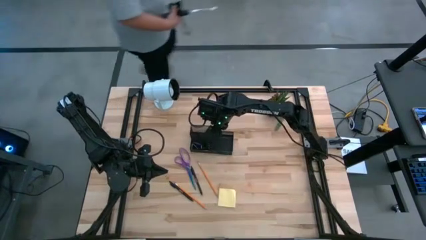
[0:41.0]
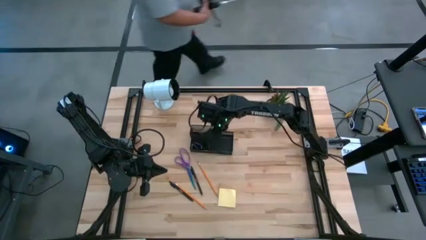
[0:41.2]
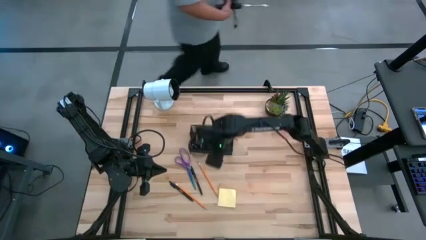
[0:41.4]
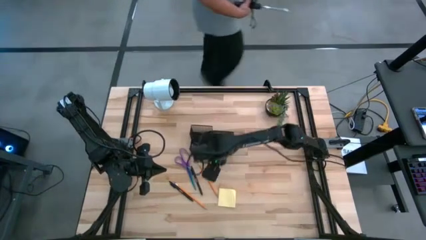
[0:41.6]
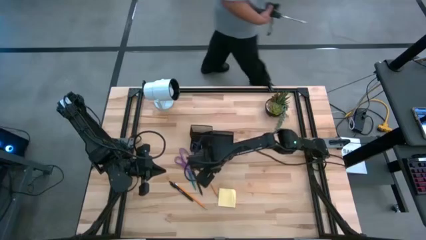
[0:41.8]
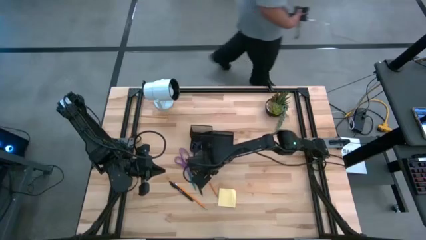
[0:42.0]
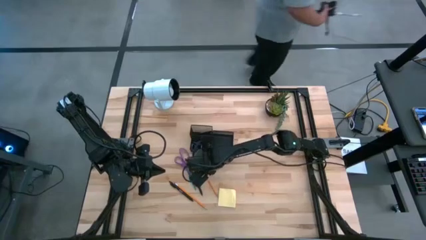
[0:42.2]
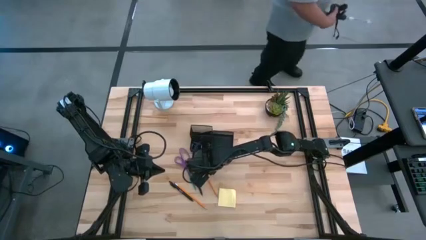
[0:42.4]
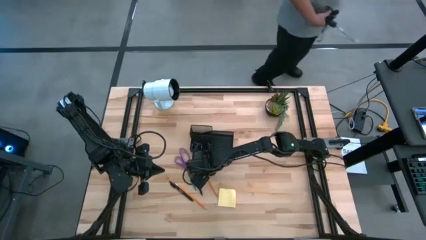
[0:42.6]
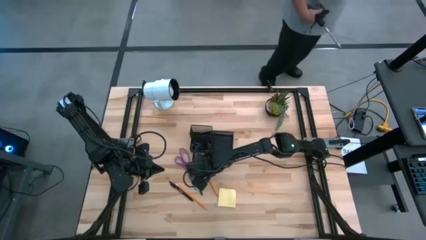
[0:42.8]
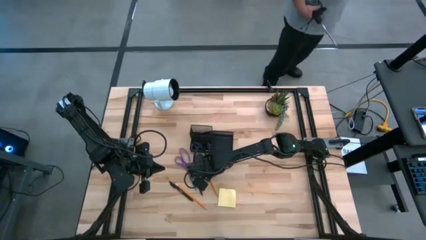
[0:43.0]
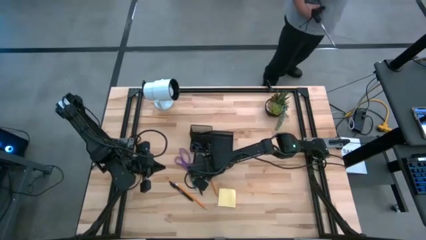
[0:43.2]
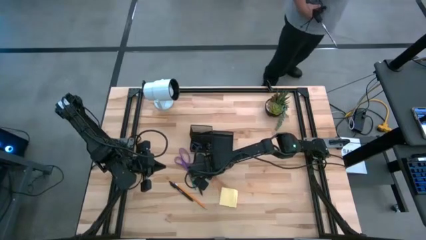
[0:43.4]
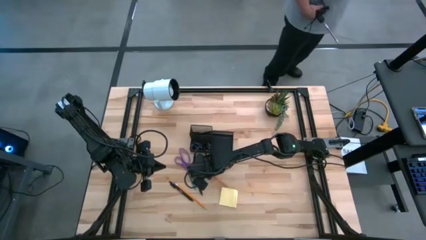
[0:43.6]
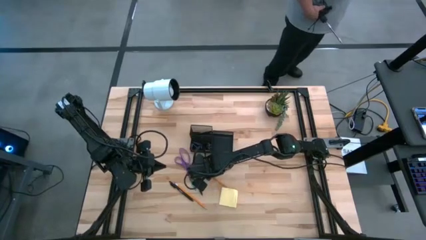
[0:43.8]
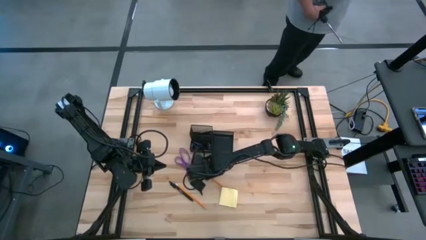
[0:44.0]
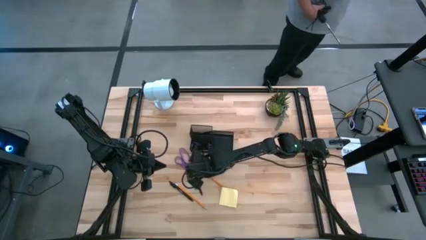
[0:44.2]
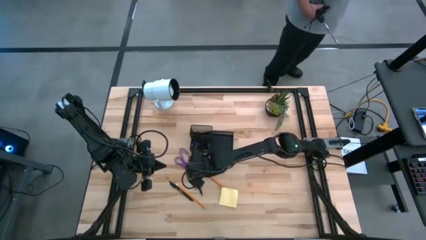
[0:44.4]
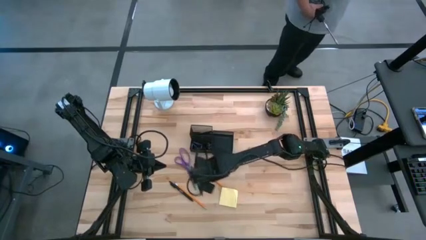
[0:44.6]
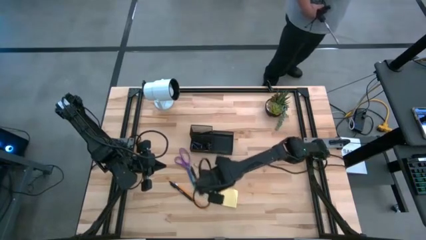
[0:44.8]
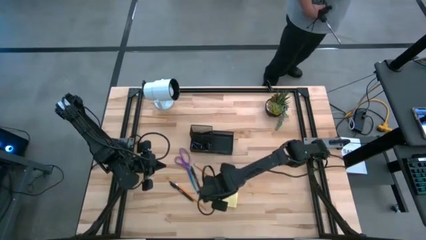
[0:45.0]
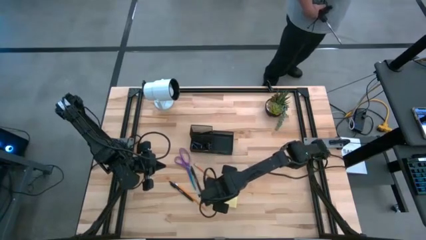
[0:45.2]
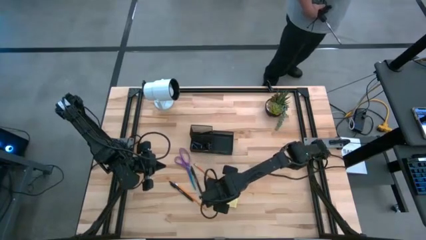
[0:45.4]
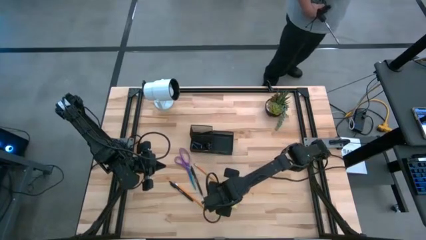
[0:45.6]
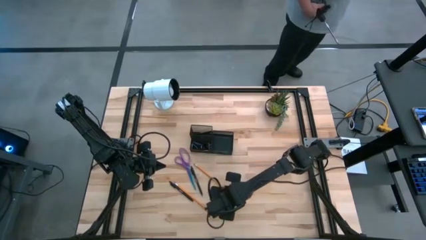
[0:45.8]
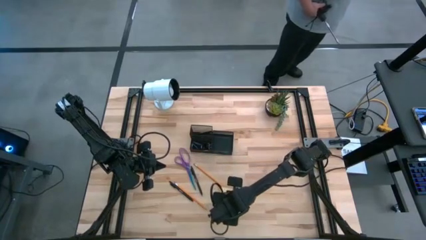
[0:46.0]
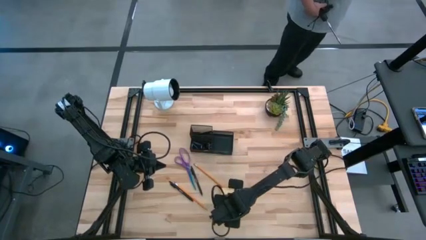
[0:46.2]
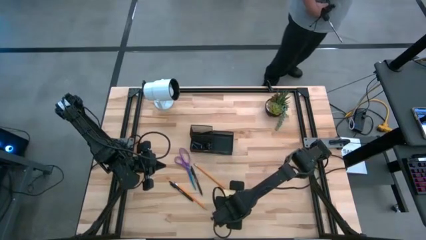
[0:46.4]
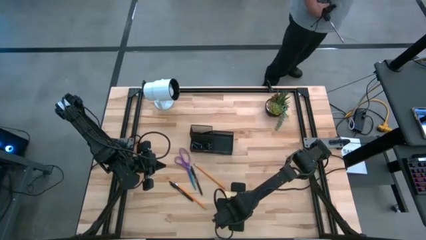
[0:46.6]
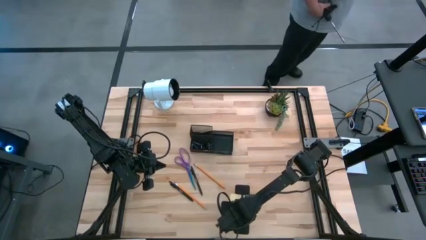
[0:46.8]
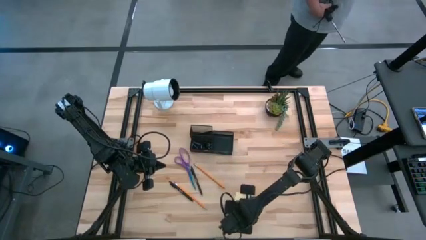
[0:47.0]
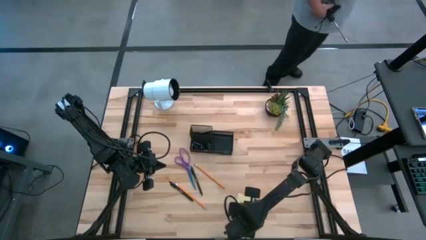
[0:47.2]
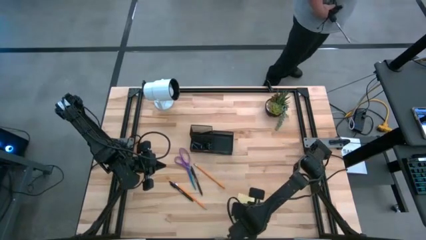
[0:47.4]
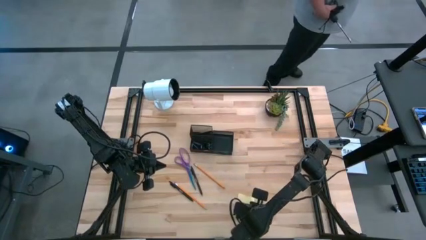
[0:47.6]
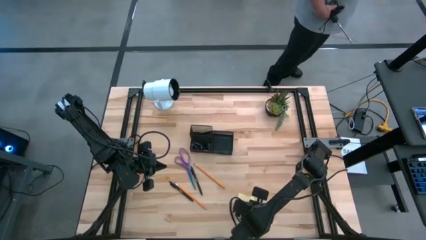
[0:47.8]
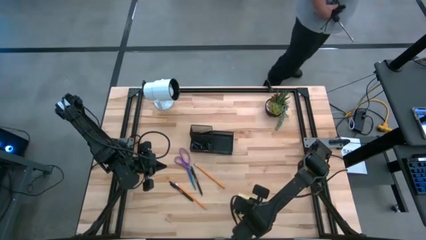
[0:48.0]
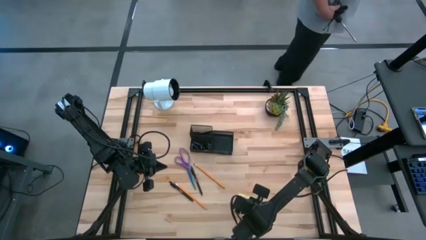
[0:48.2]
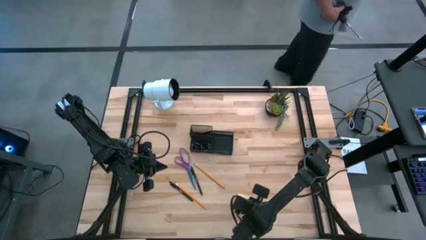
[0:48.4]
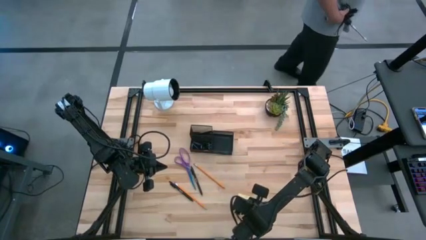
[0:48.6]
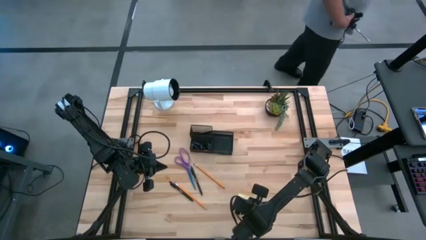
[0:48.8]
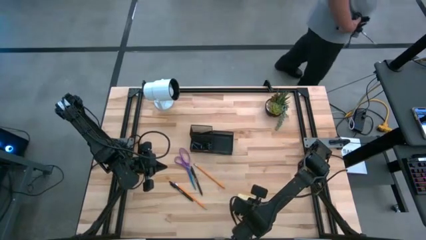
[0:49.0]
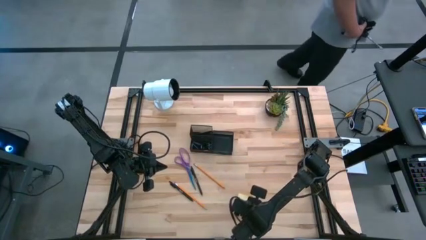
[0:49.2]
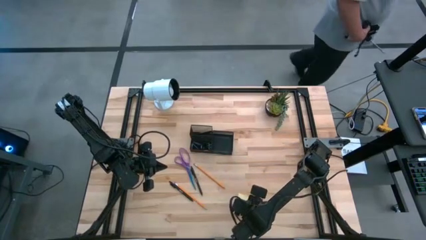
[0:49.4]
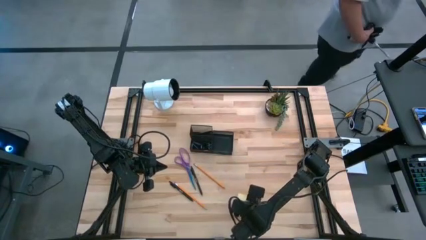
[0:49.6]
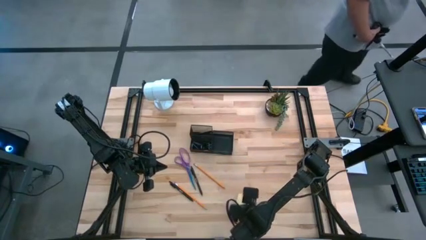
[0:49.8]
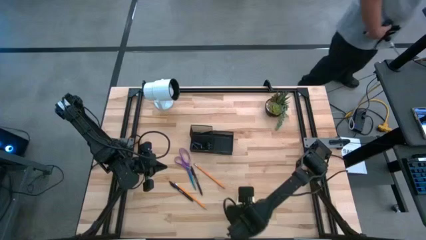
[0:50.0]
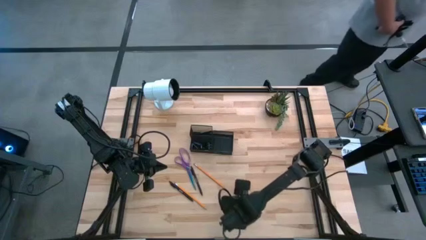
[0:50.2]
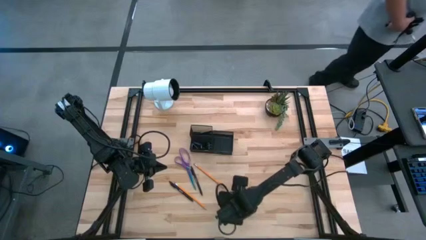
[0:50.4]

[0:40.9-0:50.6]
Task: Pick and place office supplies into organizer
Put the top yellow pencil into the black desk organizer

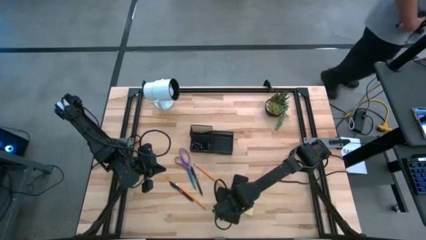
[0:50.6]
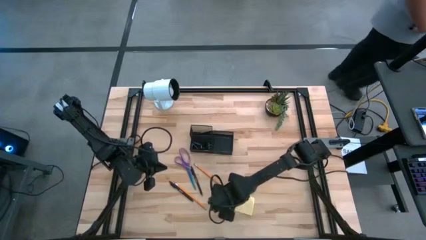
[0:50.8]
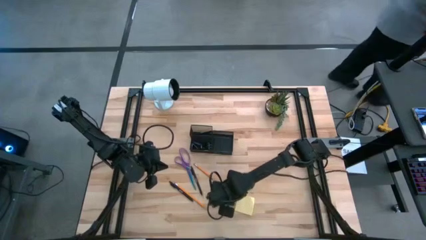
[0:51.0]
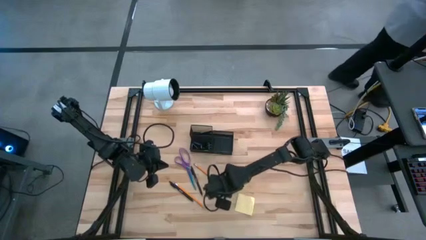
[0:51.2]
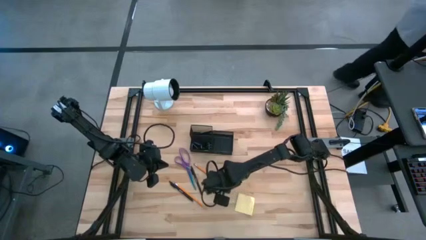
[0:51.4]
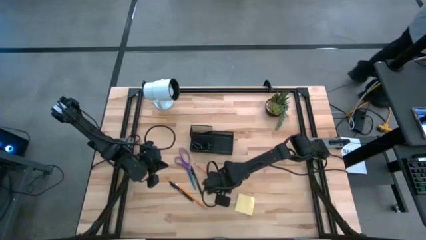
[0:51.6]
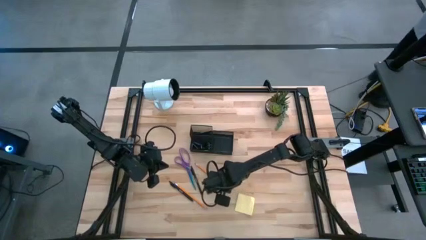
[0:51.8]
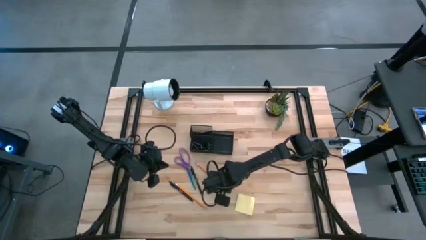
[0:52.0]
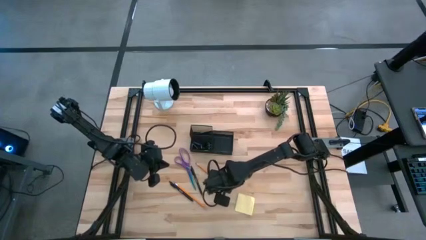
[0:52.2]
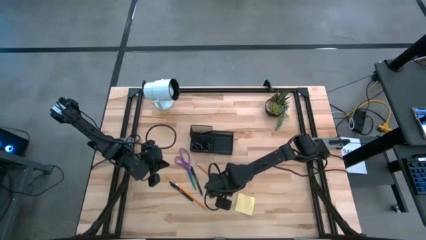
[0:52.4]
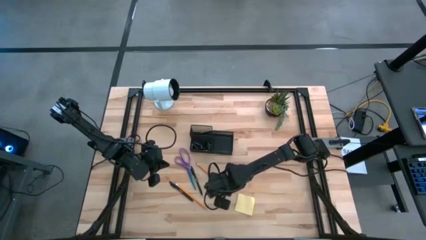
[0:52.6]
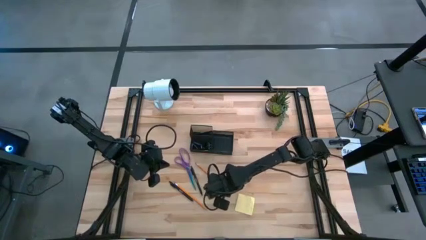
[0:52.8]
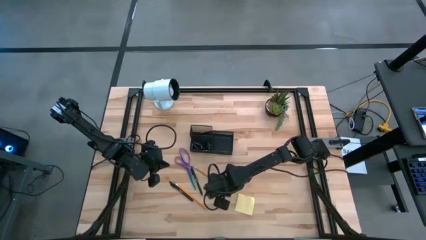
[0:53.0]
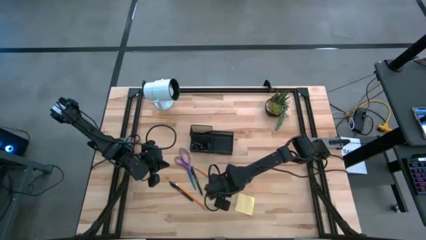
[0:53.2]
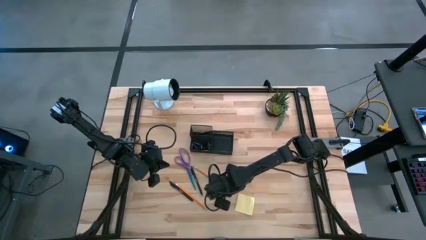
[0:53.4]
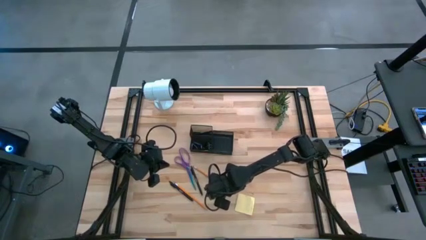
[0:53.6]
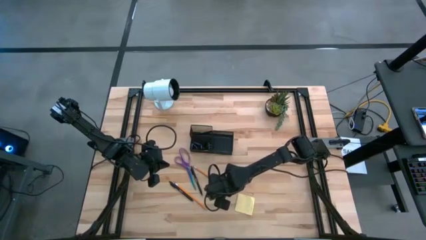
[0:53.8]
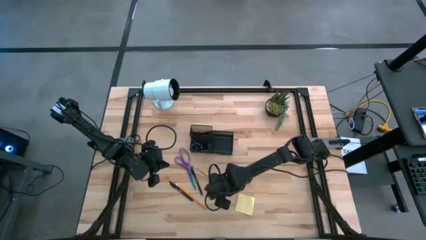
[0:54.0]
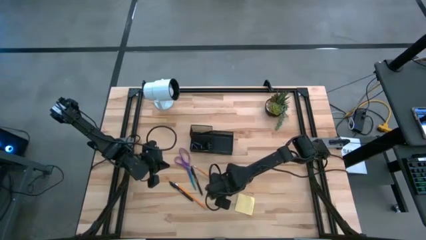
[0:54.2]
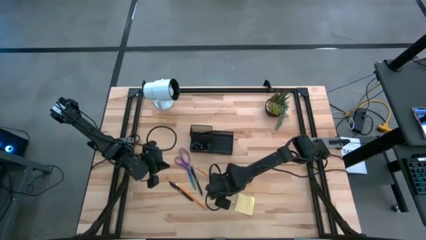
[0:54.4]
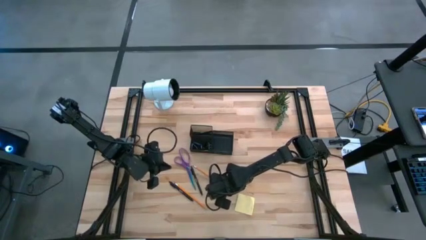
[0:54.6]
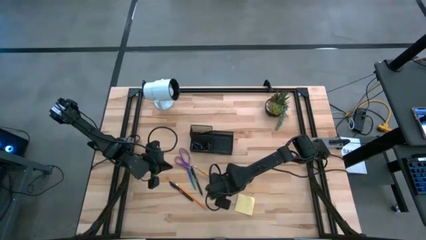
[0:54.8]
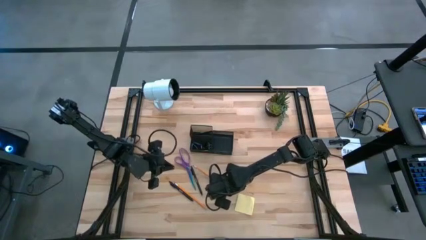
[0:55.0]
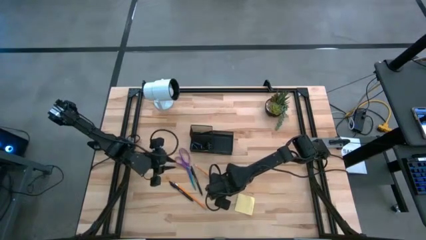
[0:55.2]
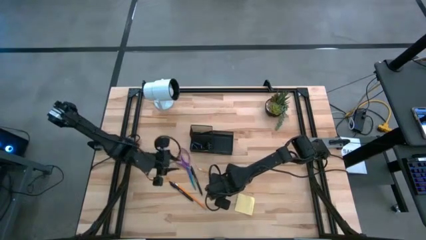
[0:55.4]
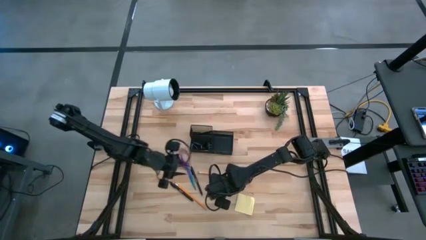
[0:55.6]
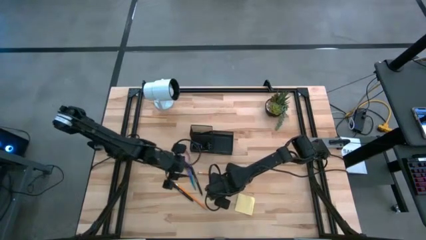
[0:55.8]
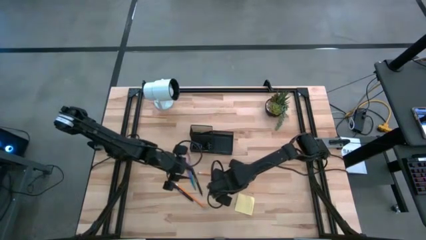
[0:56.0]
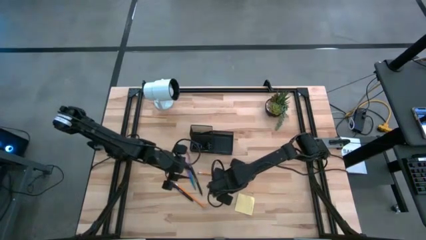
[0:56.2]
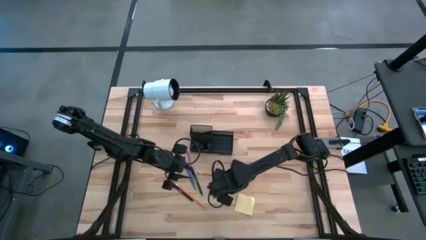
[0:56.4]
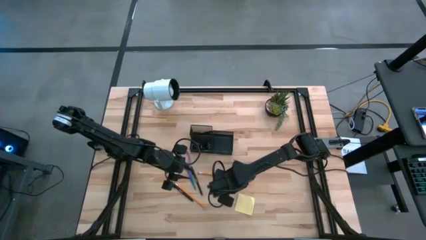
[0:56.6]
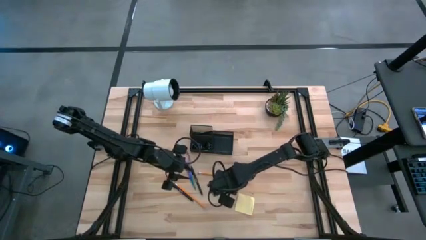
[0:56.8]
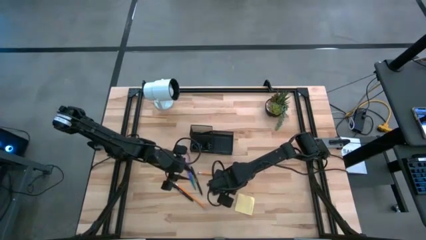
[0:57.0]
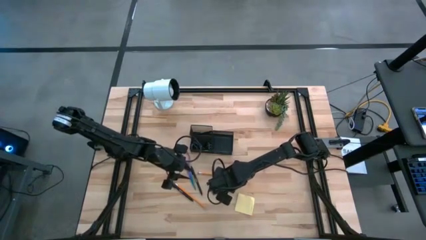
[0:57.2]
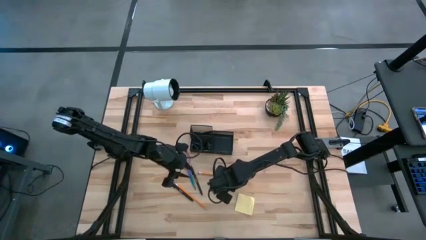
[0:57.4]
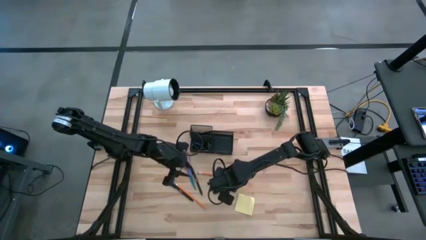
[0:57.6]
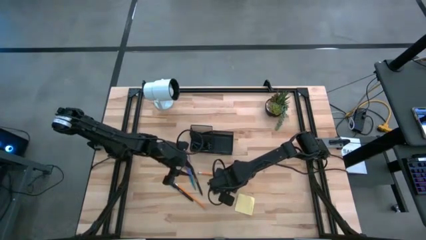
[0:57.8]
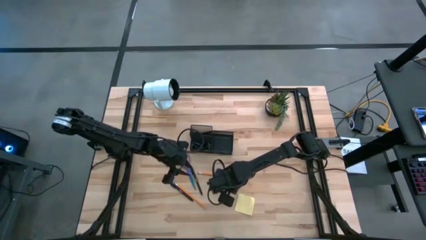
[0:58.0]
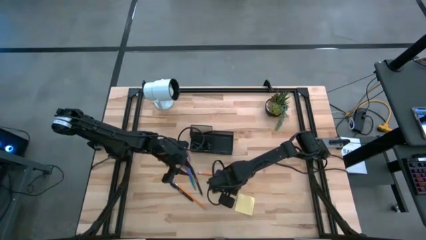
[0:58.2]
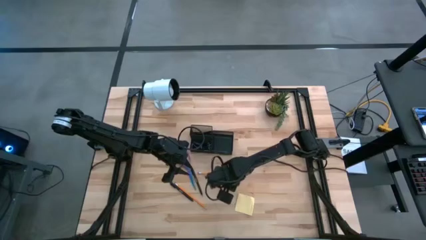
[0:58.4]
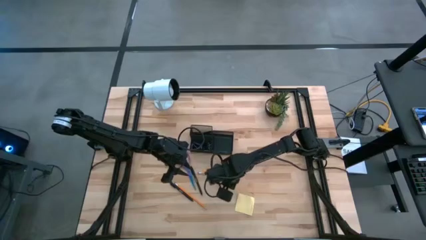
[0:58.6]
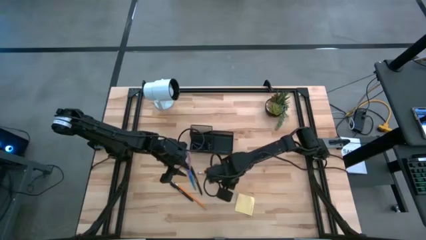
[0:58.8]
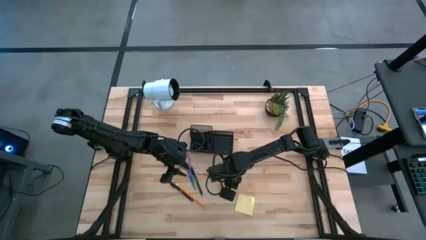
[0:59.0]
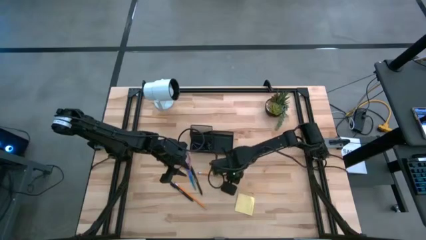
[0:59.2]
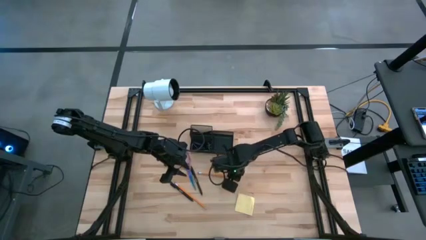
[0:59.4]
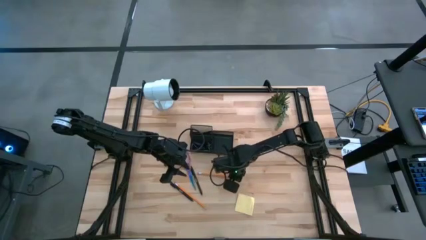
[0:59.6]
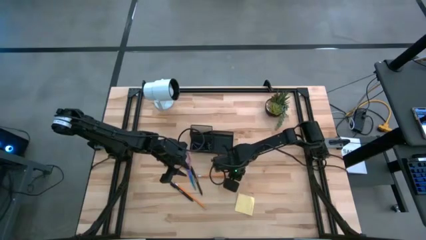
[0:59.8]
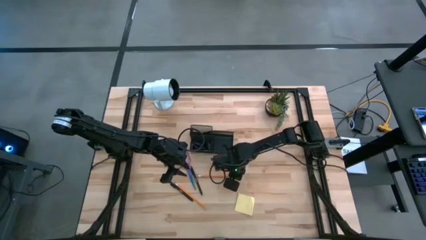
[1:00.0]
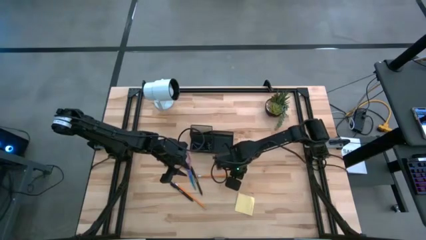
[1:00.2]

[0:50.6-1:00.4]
Put the top yellow pencil into the black desk organizer
